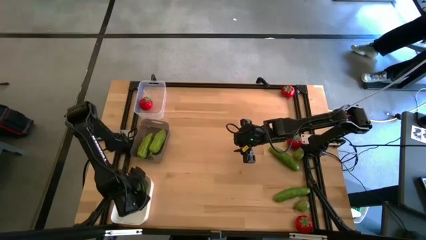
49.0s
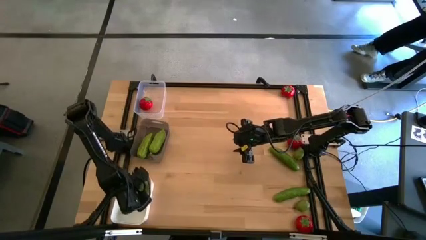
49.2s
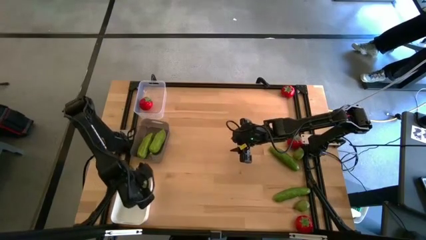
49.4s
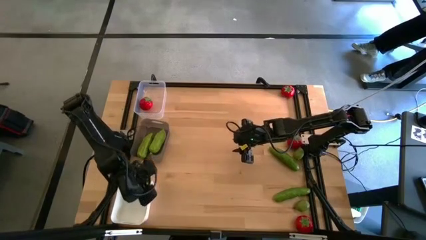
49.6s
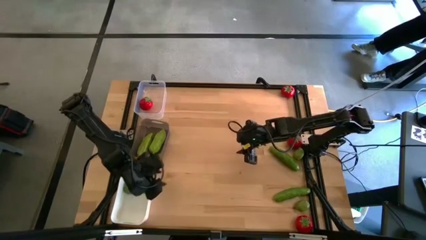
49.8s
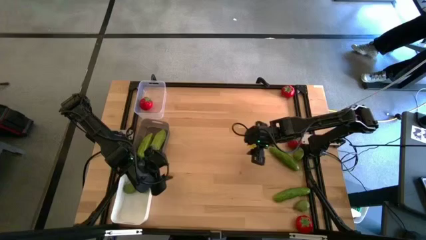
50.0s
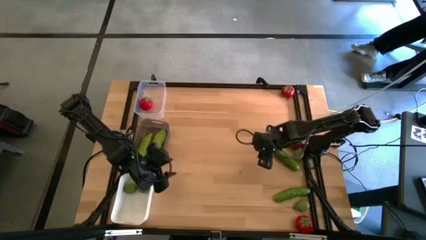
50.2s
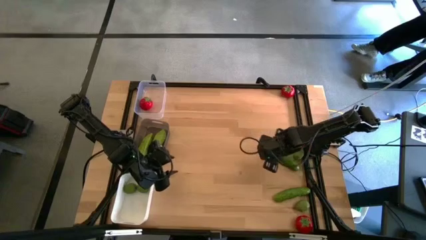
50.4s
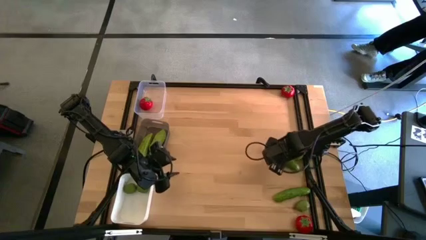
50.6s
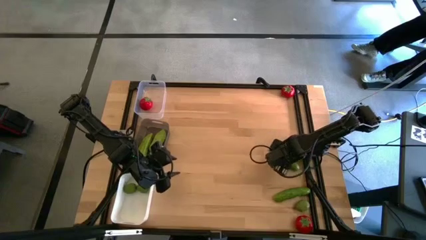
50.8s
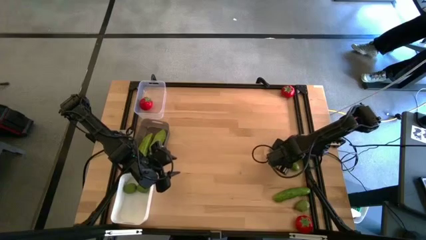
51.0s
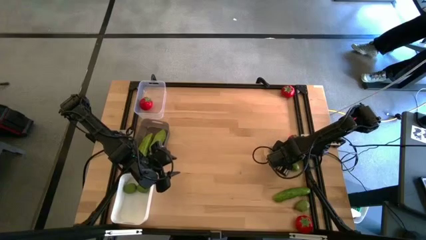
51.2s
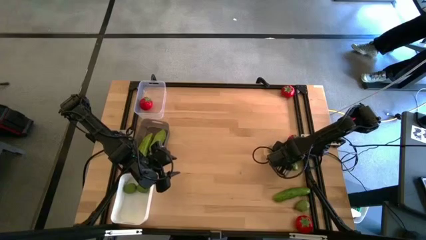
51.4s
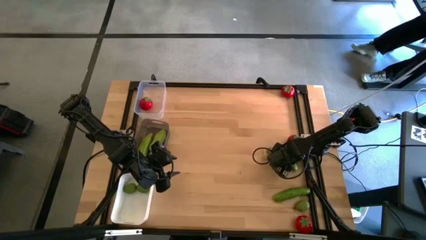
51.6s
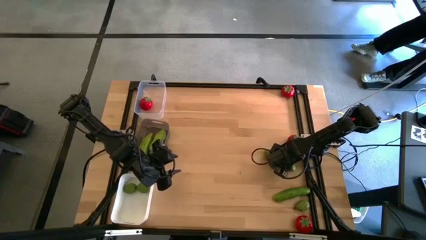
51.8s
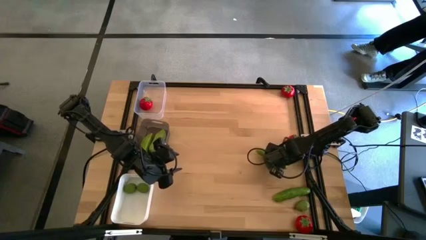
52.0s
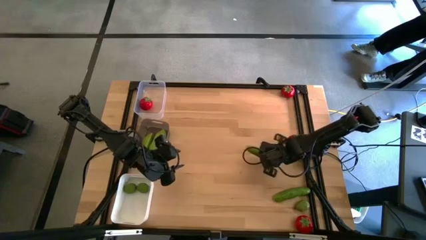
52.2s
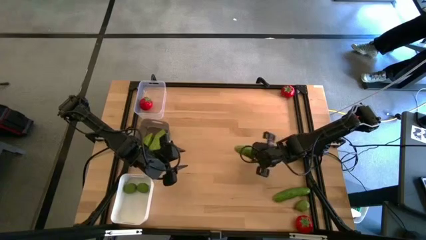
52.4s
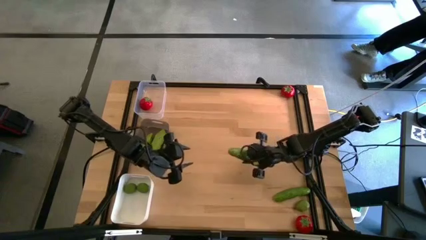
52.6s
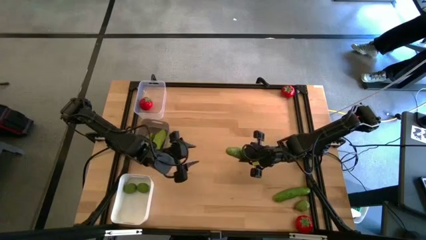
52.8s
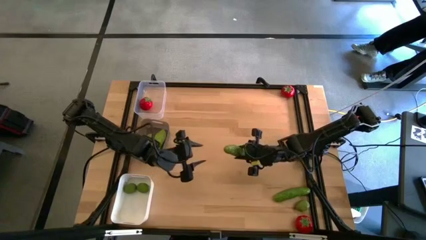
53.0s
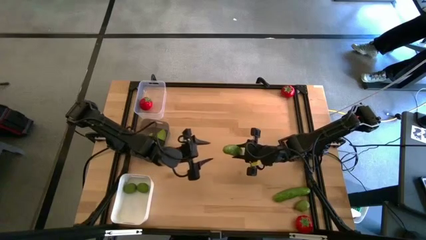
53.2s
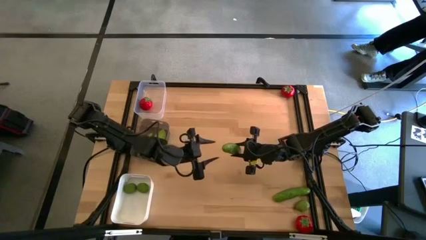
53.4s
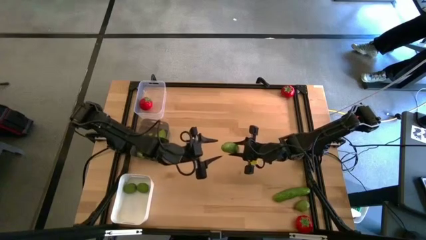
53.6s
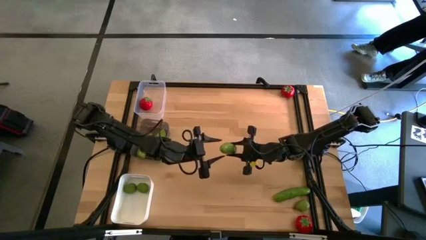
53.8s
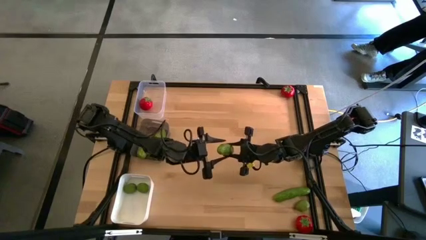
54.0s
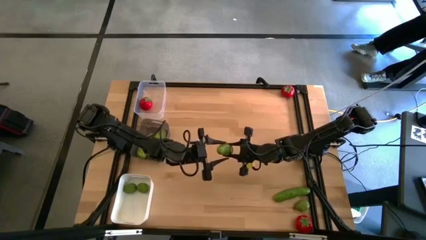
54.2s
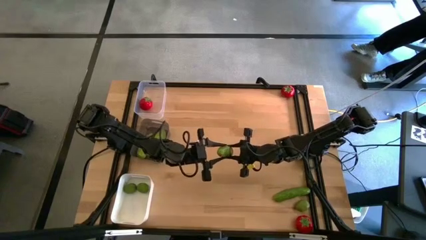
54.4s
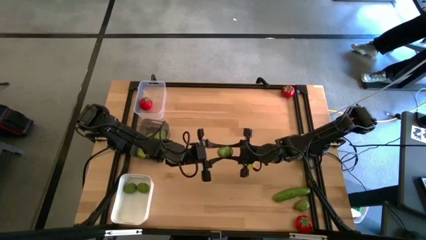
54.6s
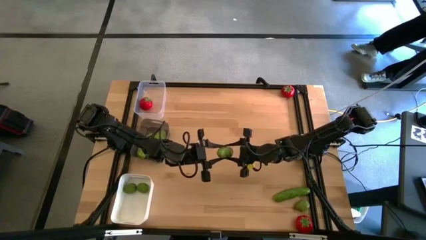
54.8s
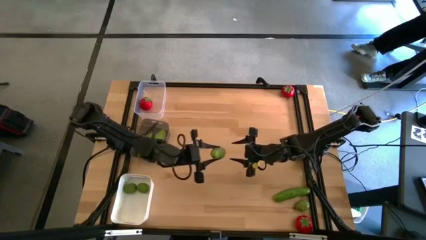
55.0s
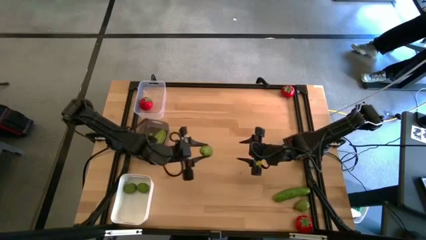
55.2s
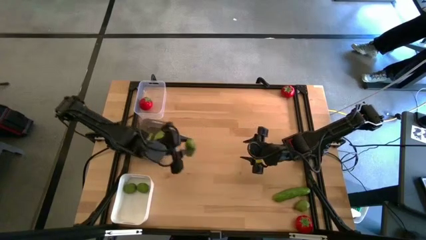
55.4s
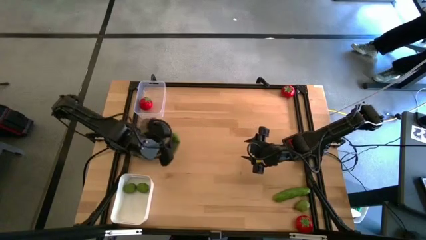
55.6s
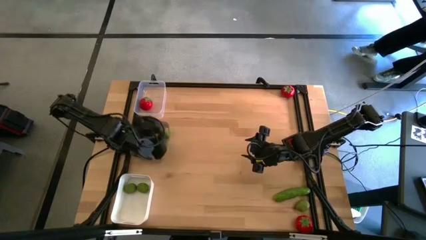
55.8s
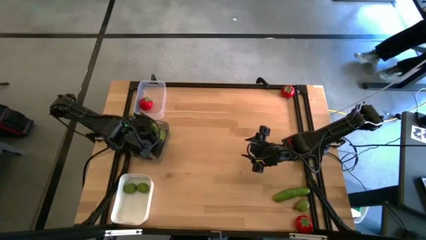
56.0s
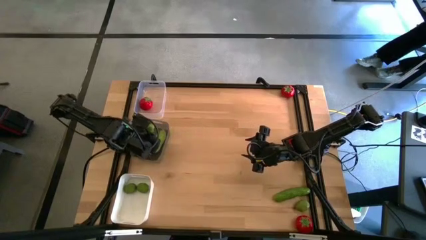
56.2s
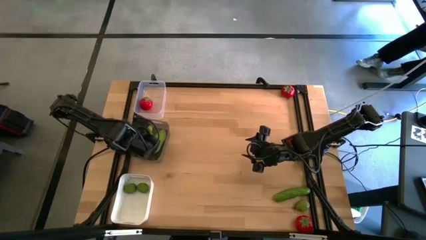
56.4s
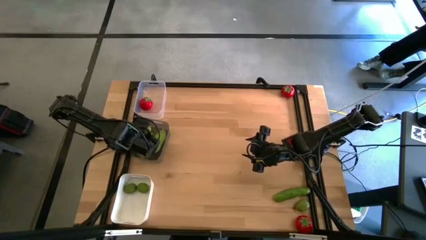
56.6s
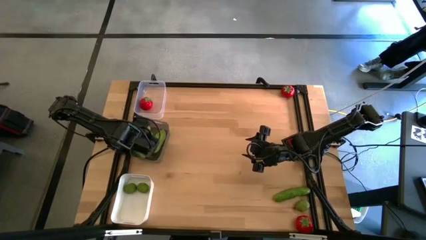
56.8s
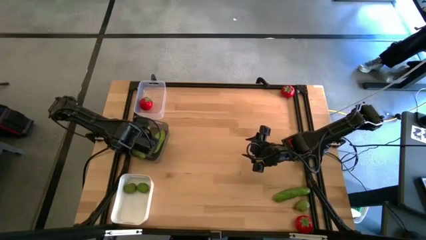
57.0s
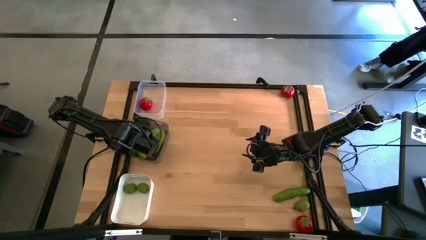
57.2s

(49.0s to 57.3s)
Task: Sort produce into baskets
Put the top bitter melon into the black bin

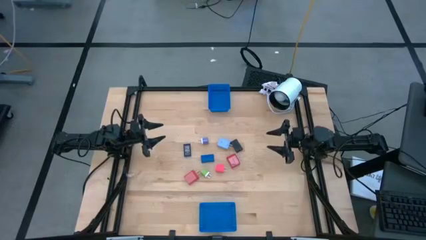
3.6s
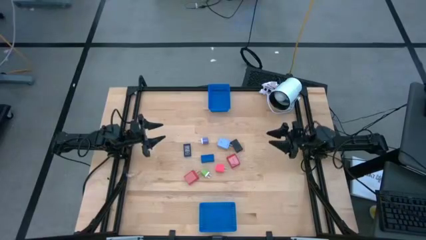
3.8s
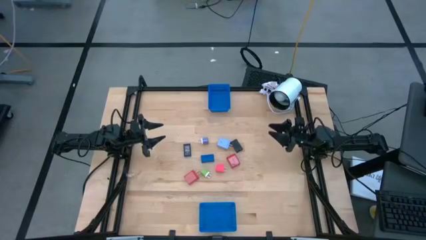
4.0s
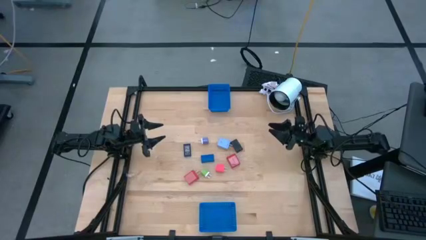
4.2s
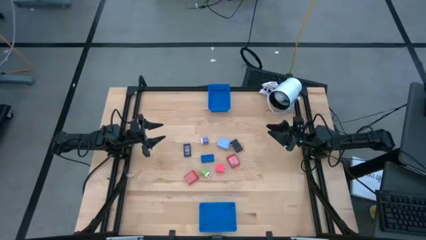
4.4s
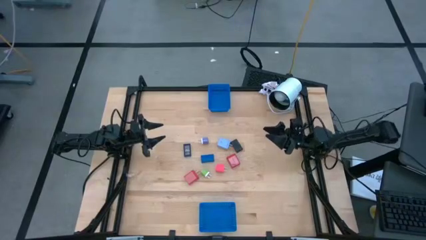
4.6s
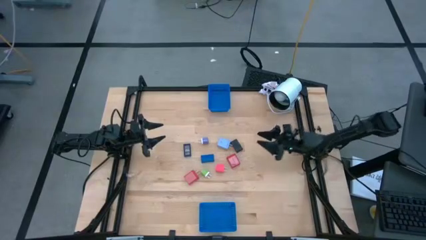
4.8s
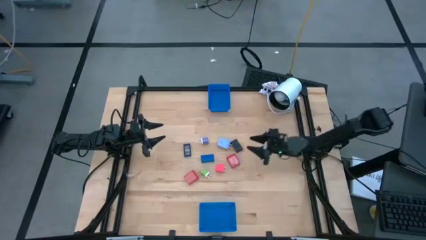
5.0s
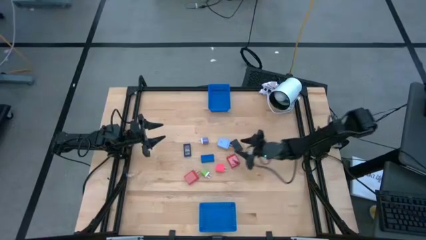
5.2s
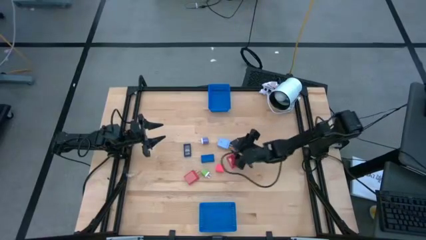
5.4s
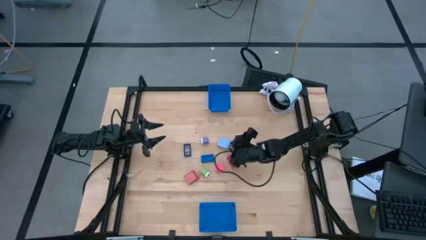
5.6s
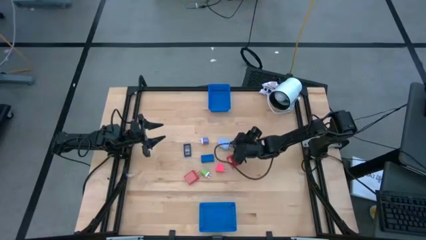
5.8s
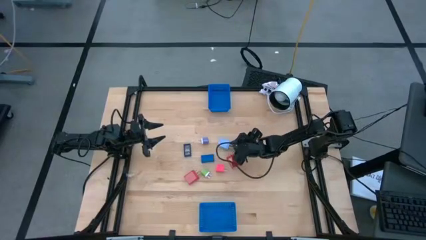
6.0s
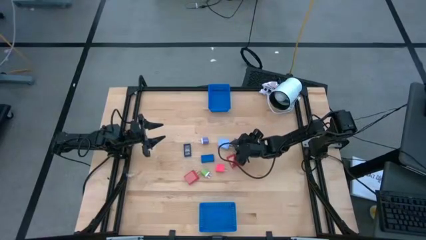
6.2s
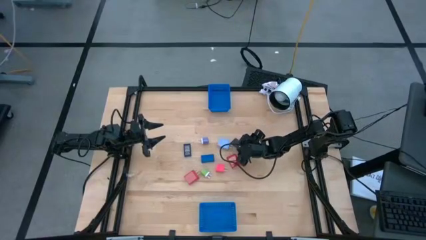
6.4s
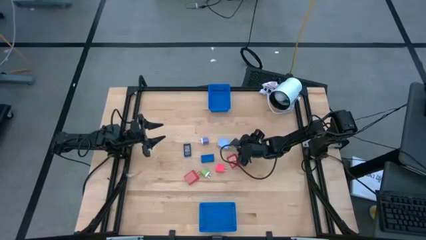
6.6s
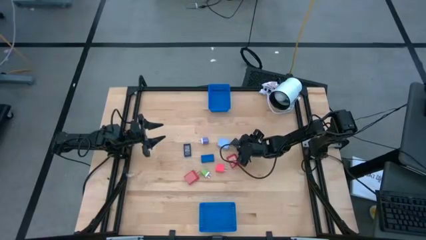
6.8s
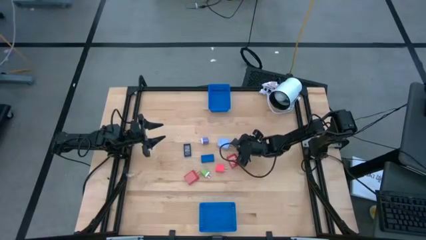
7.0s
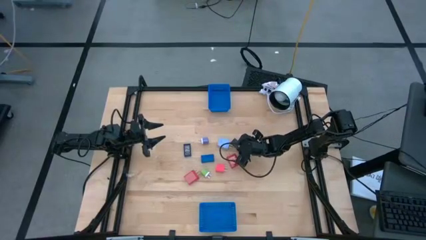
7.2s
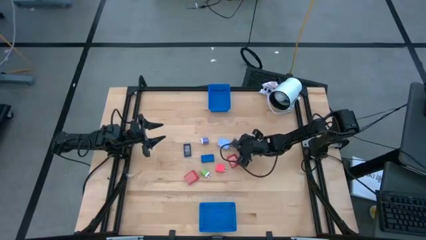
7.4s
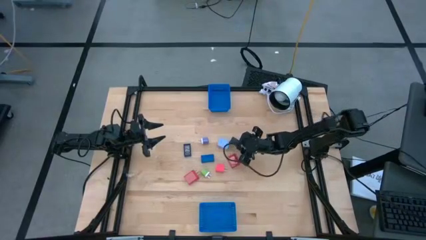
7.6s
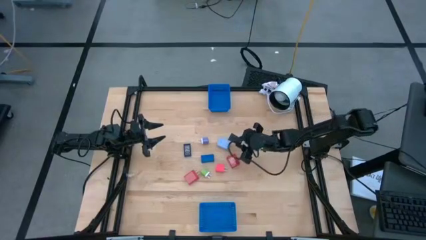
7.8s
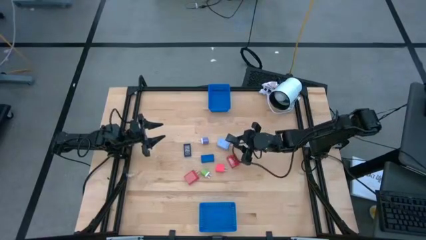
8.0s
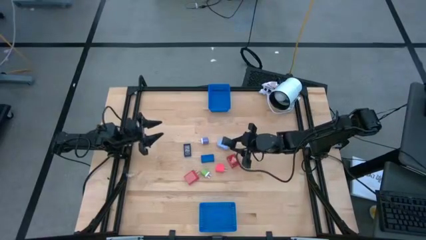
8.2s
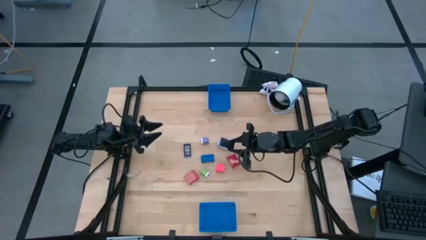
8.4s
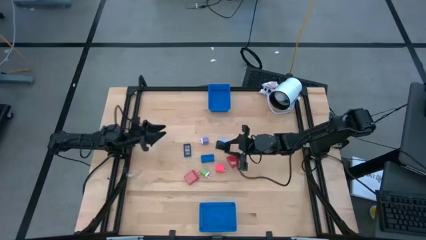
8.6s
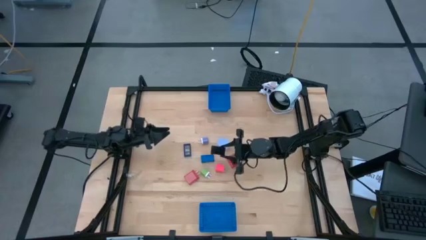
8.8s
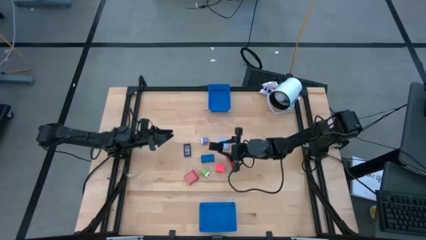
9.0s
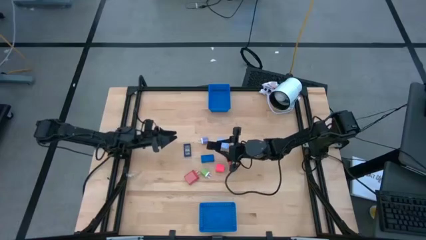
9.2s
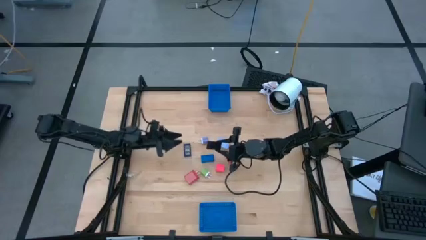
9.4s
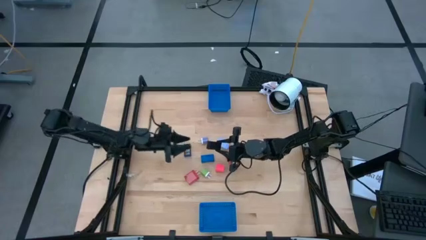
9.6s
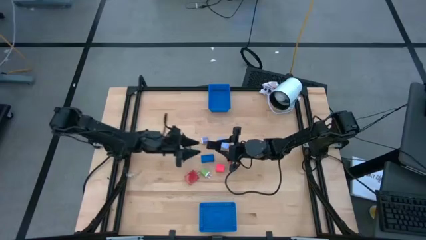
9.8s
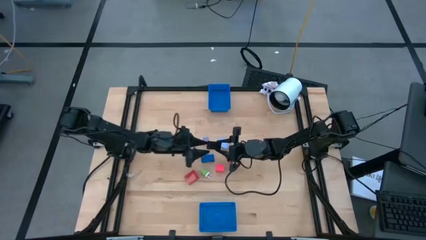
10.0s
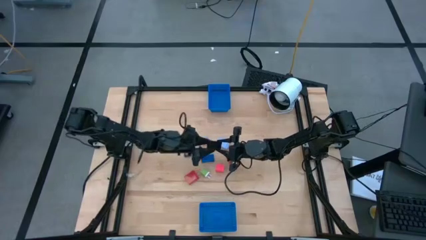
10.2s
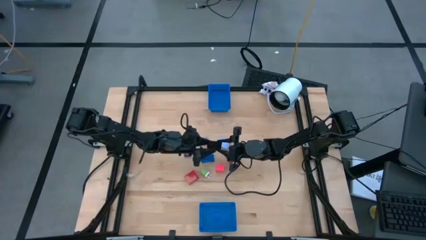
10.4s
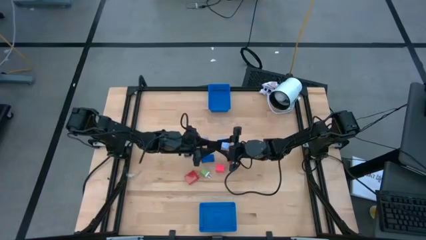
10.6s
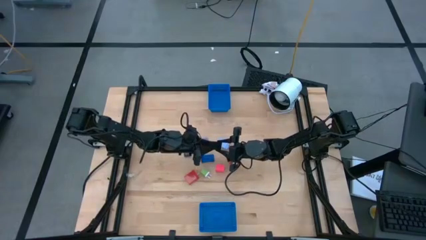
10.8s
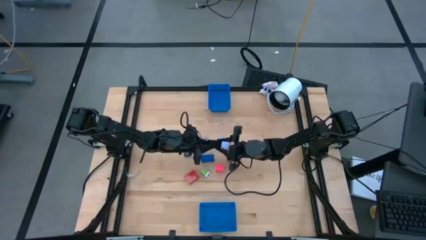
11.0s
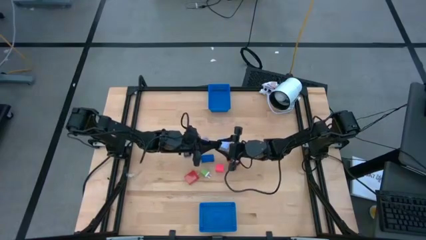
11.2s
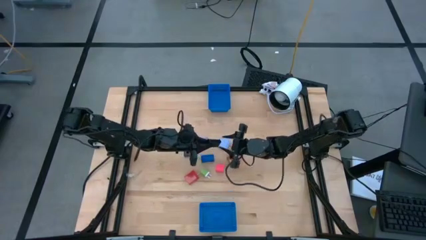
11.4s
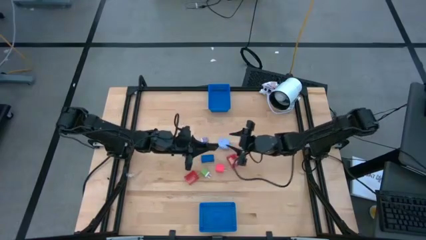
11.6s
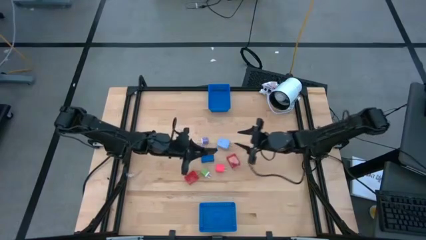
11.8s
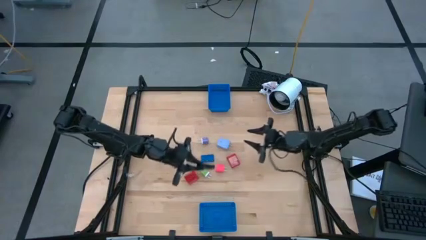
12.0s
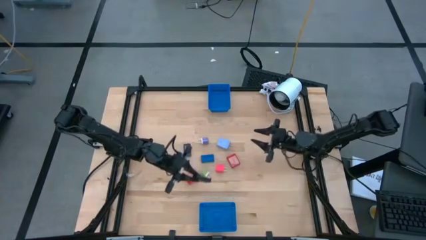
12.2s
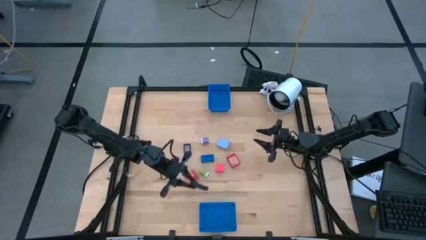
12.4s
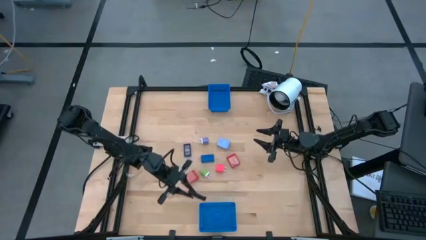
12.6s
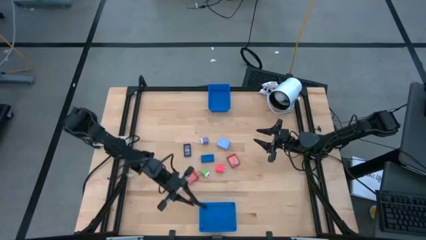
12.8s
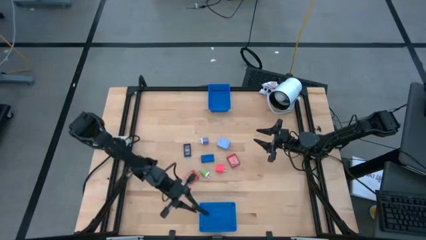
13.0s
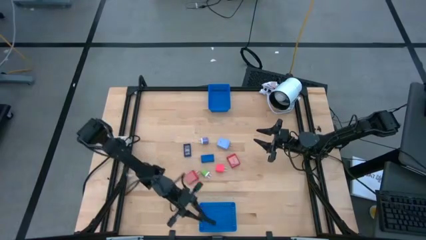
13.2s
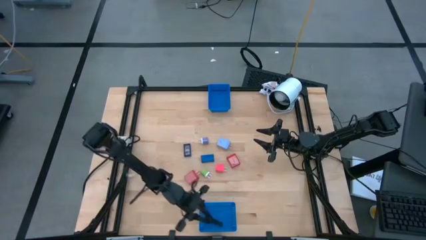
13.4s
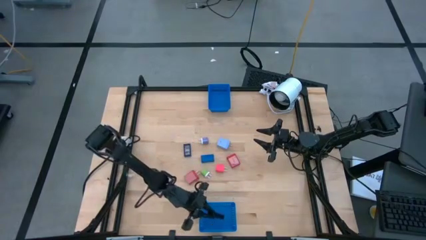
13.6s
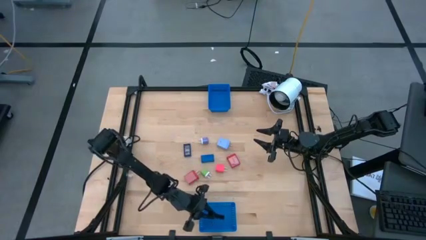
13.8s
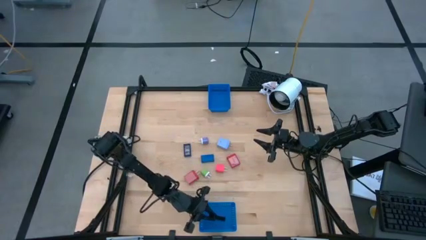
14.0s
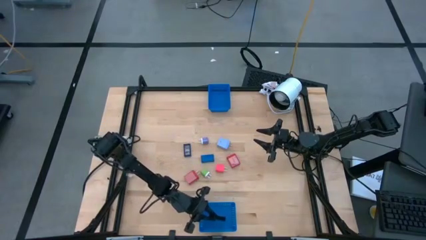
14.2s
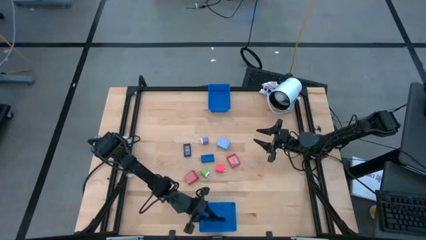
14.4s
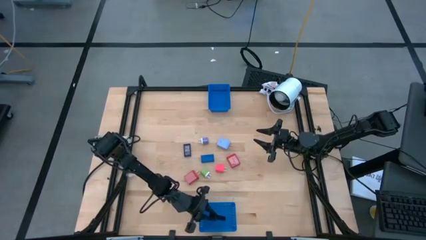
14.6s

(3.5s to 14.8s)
Task: Pick & Place Office items
Put the black digital timer into the bottom blue bin
